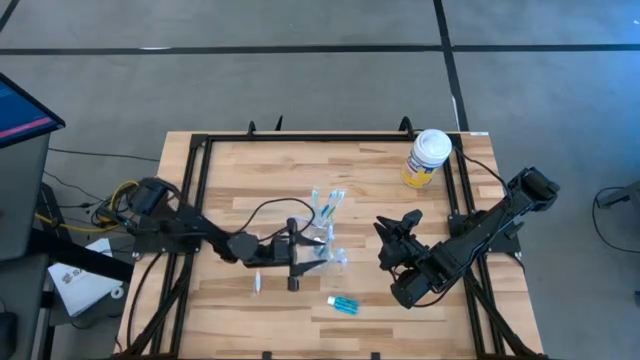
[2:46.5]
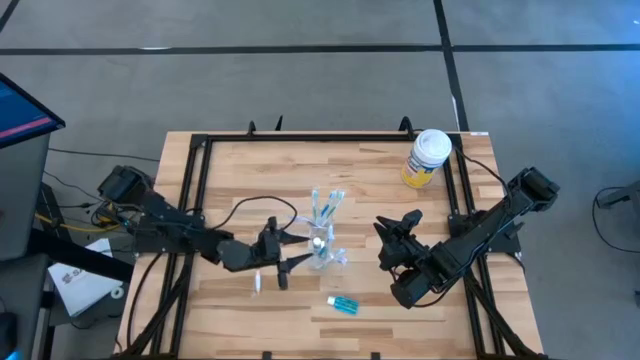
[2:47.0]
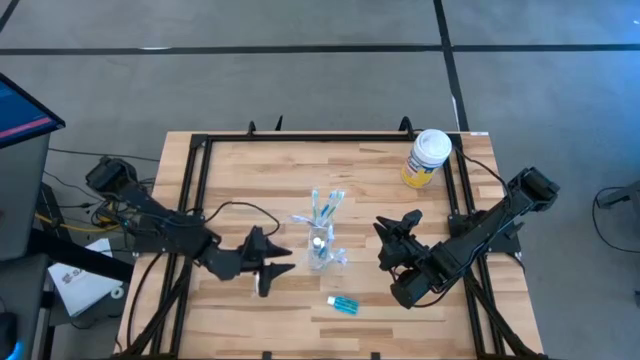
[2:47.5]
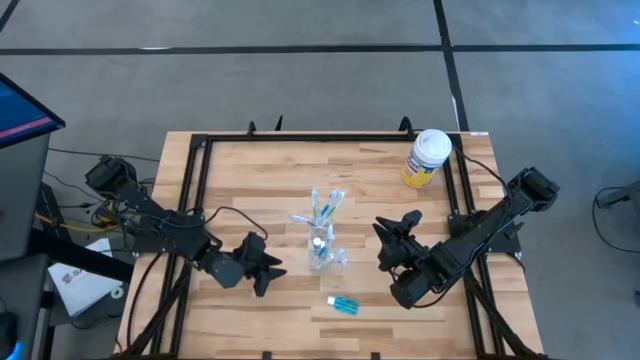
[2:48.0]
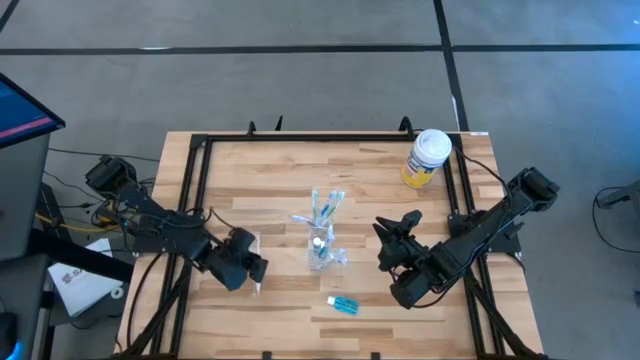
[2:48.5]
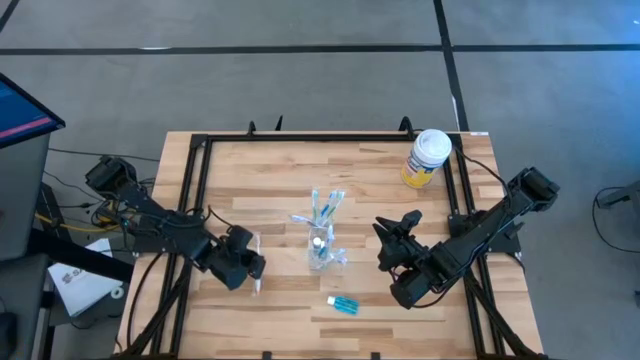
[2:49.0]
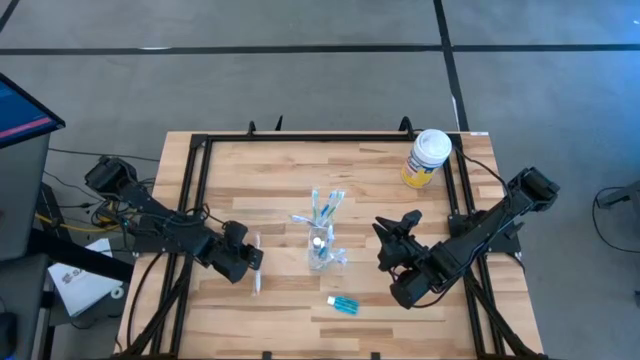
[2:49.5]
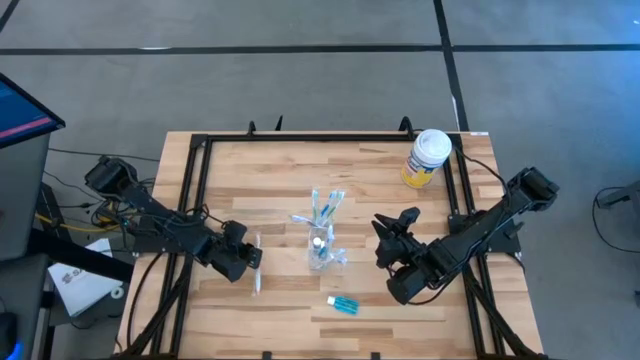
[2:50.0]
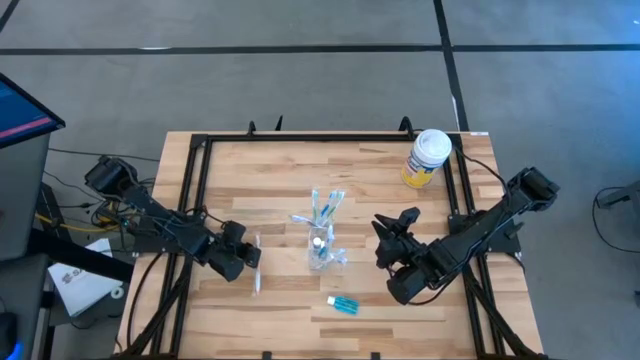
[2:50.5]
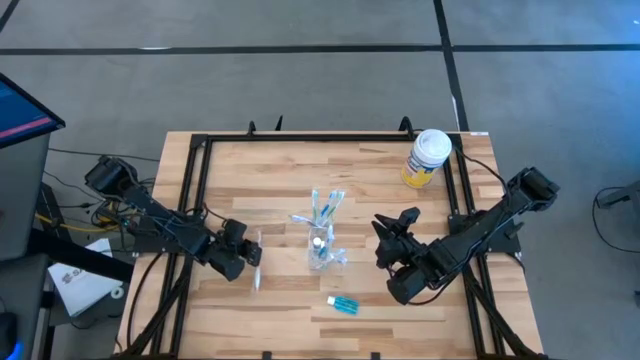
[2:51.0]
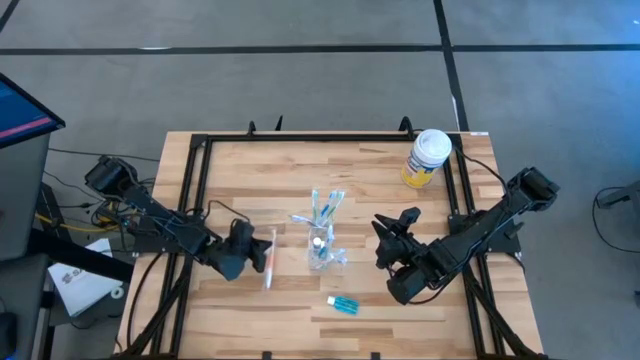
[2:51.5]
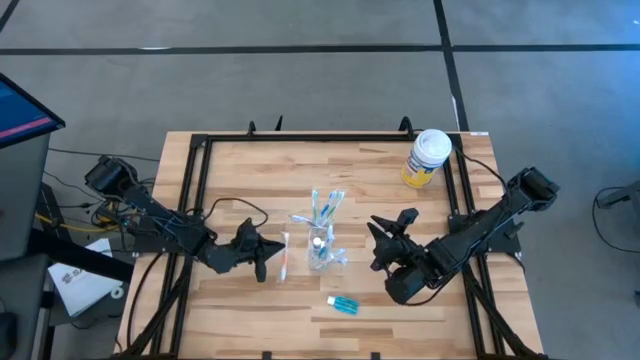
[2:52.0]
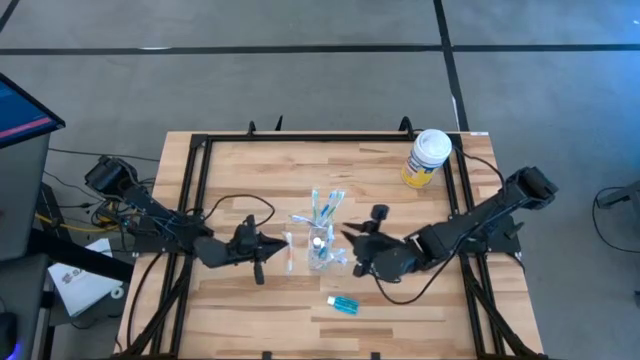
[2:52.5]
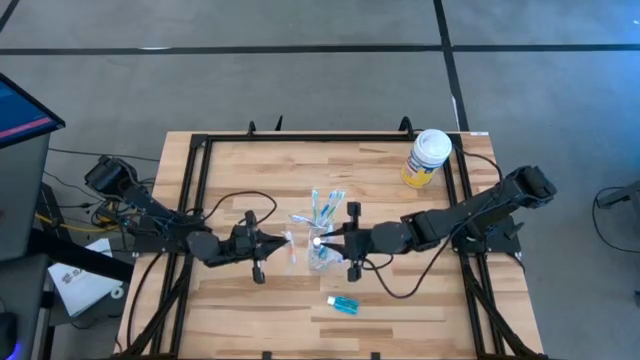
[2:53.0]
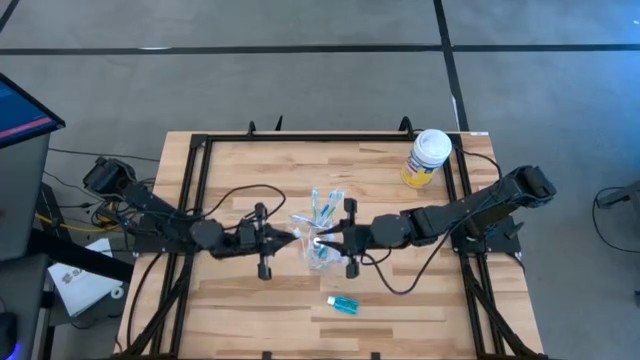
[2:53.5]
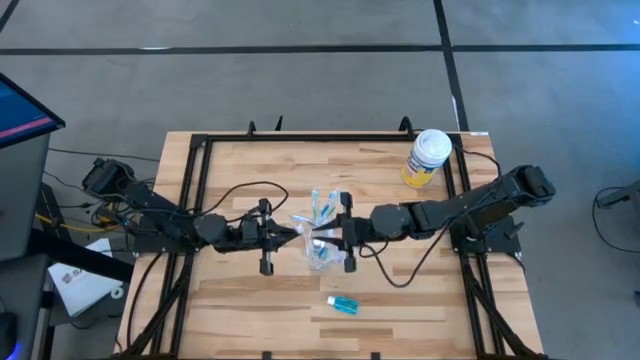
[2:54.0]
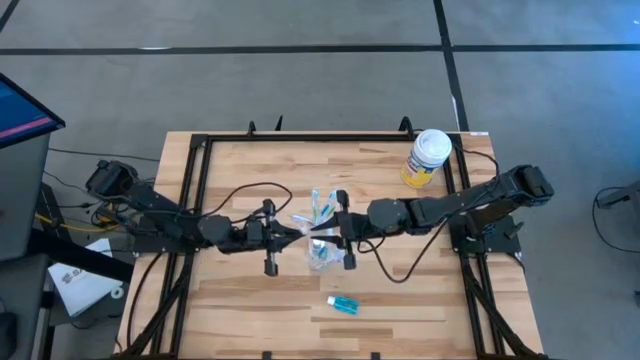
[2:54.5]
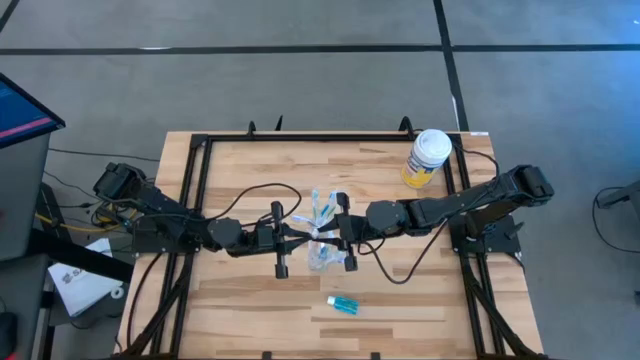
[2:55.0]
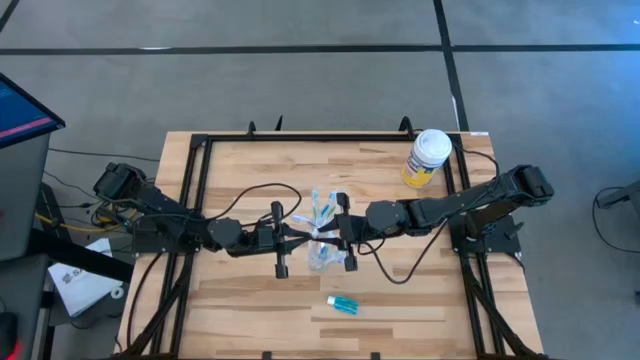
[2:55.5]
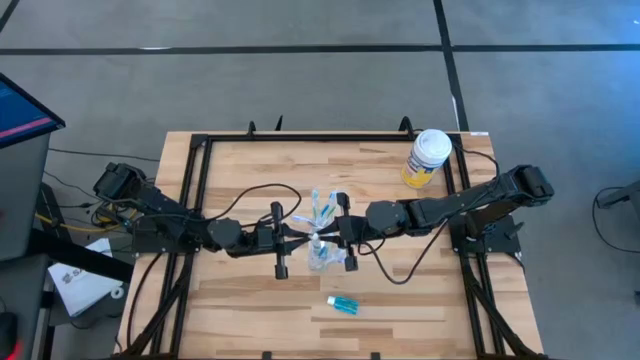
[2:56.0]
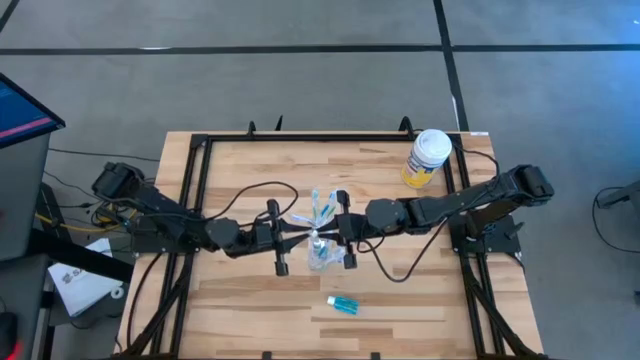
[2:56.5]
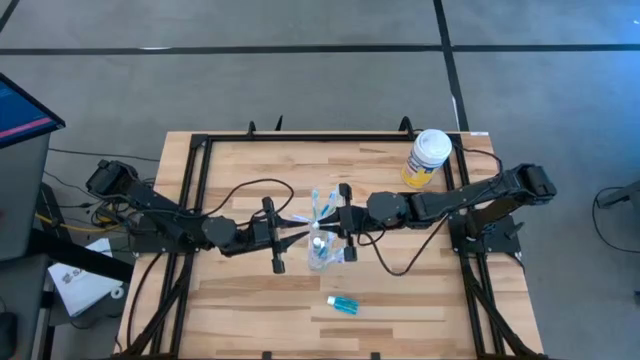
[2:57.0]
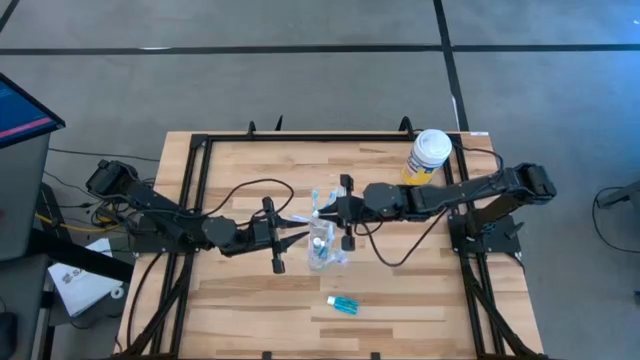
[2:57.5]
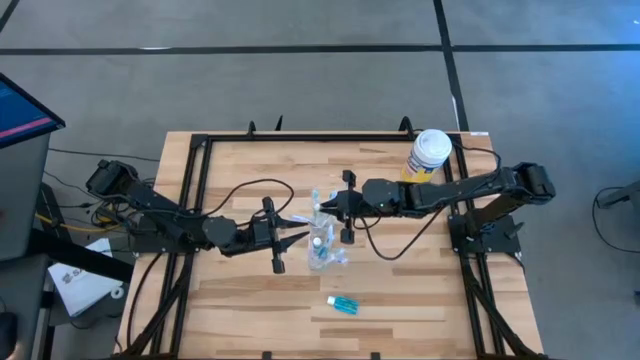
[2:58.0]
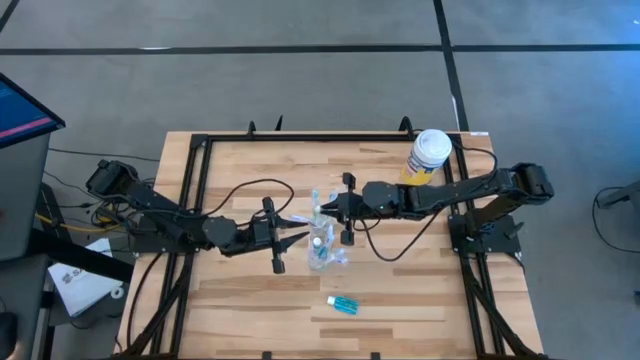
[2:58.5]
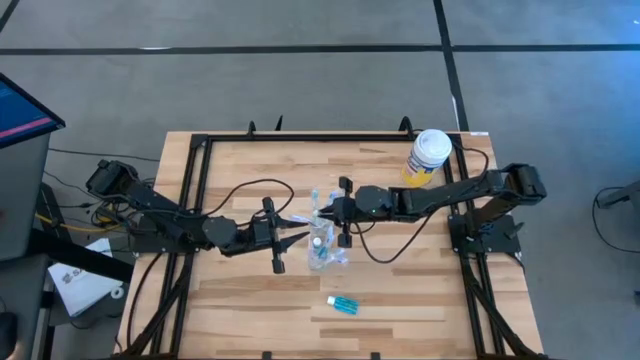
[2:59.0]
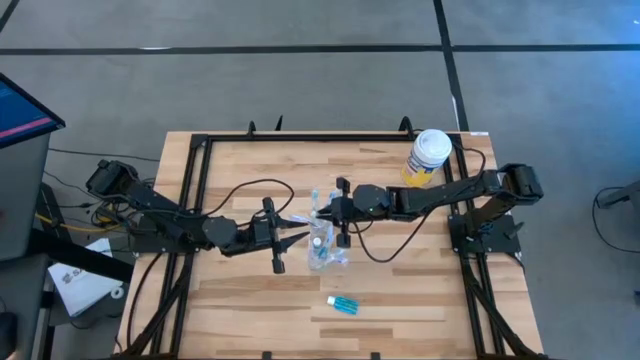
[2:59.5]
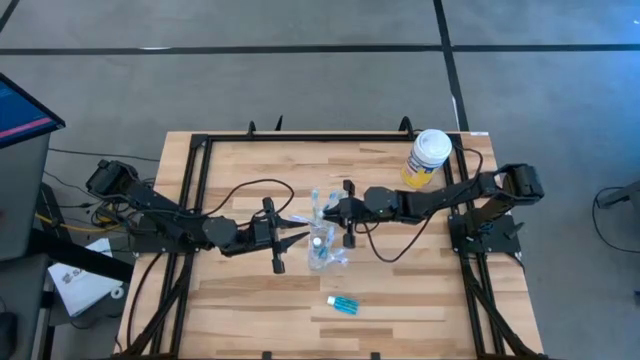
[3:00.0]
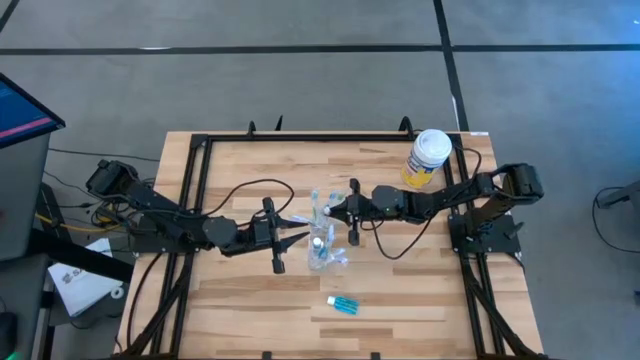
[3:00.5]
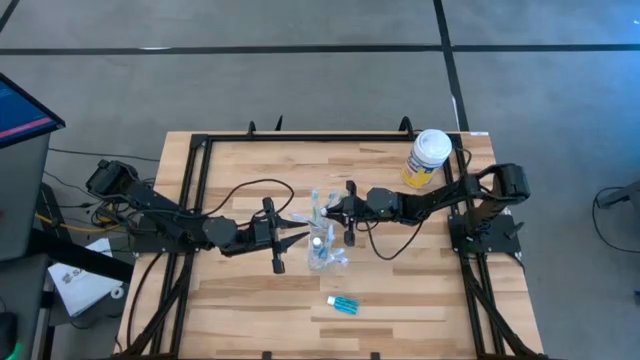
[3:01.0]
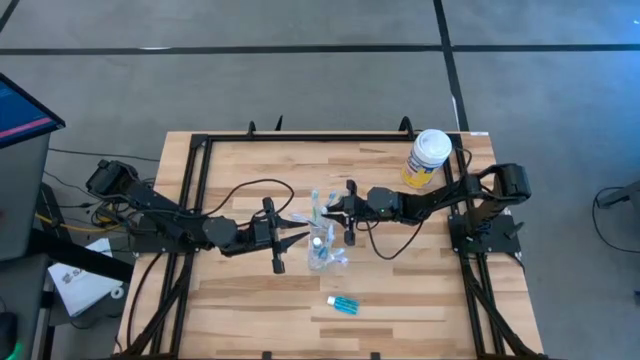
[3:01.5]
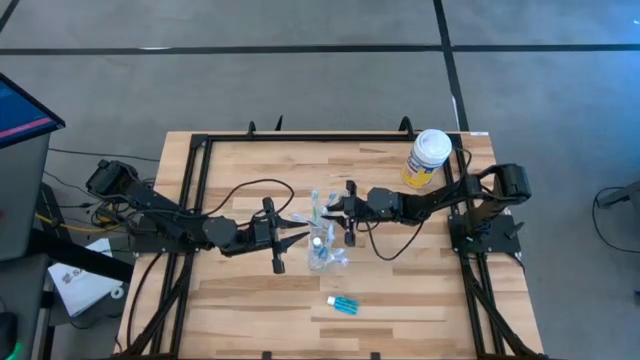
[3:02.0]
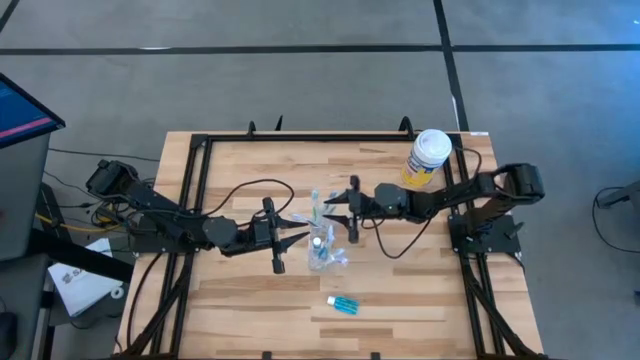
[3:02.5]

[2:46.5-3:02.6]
Task: Pick & Place toothbrushing station
Put the orange toothbrush into the transparent organizer

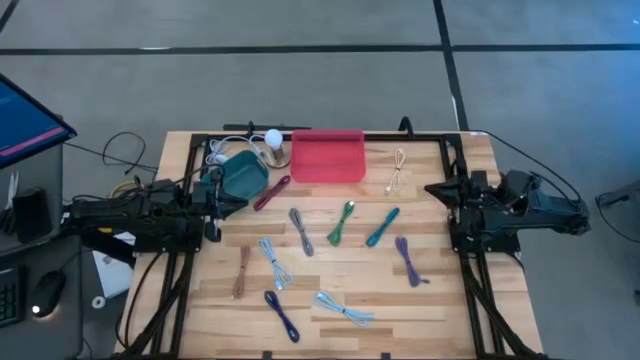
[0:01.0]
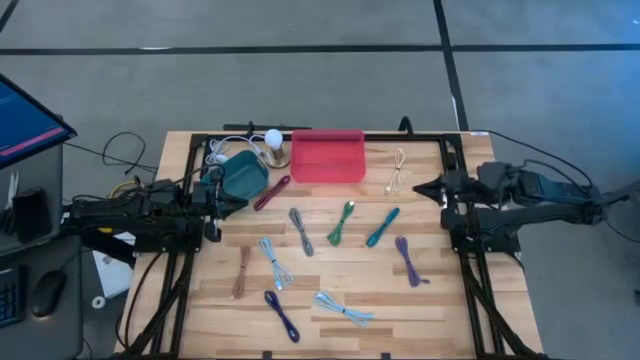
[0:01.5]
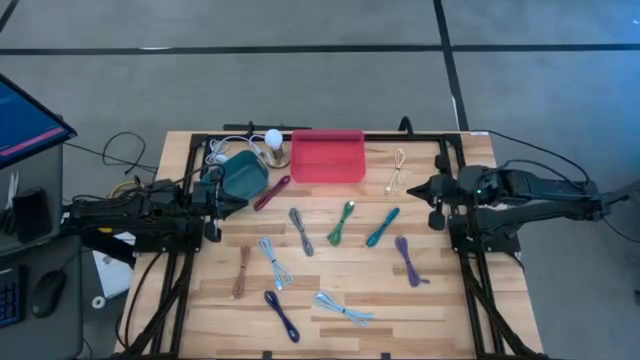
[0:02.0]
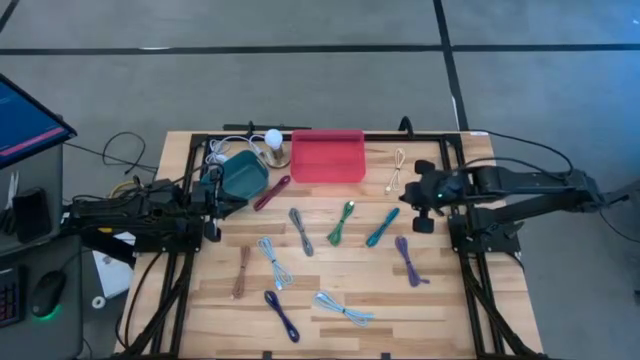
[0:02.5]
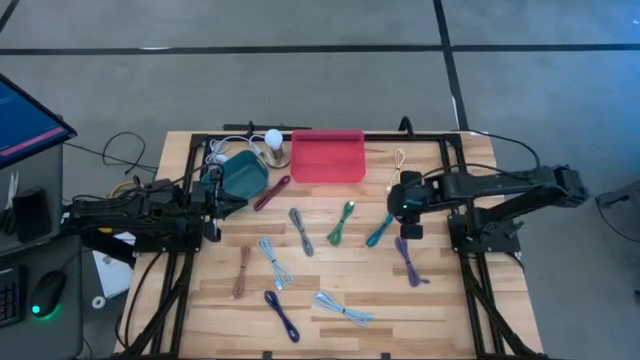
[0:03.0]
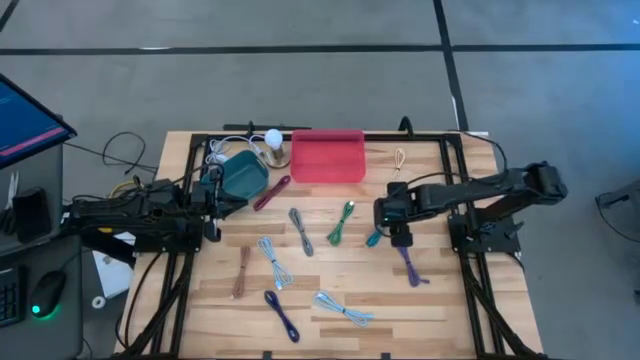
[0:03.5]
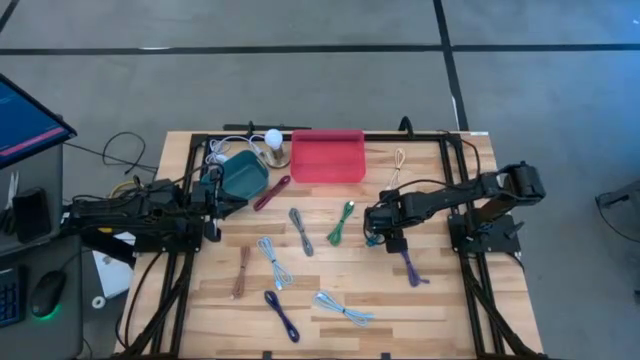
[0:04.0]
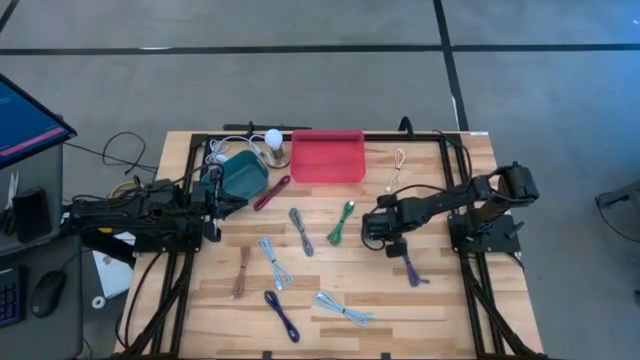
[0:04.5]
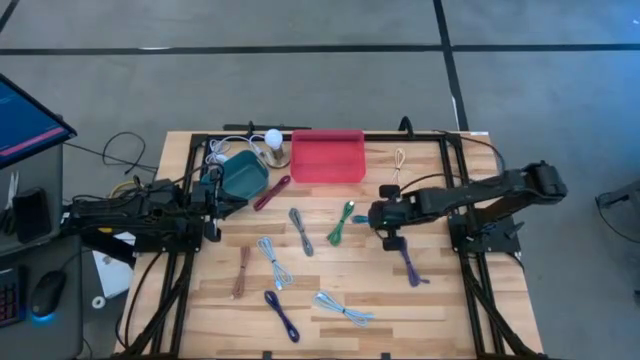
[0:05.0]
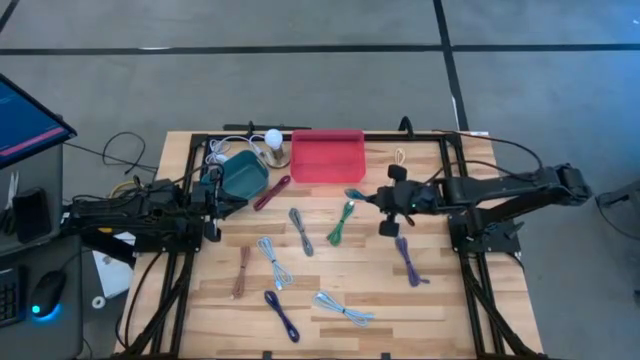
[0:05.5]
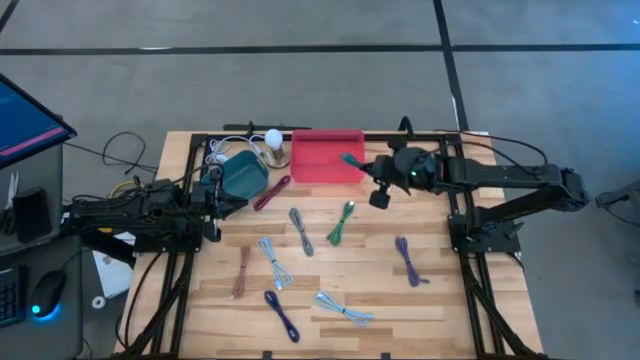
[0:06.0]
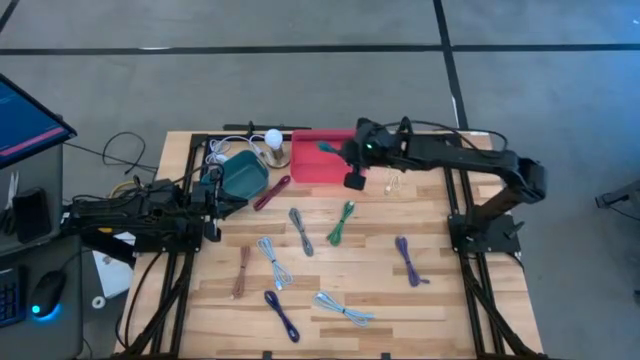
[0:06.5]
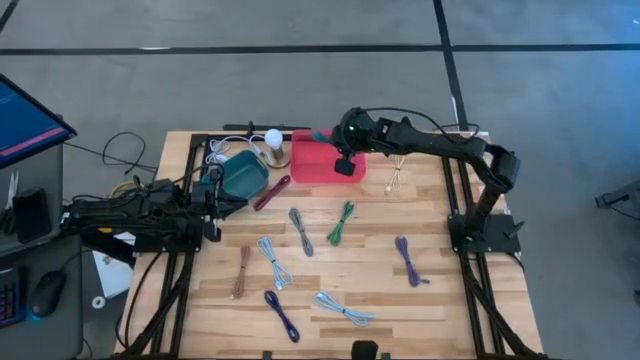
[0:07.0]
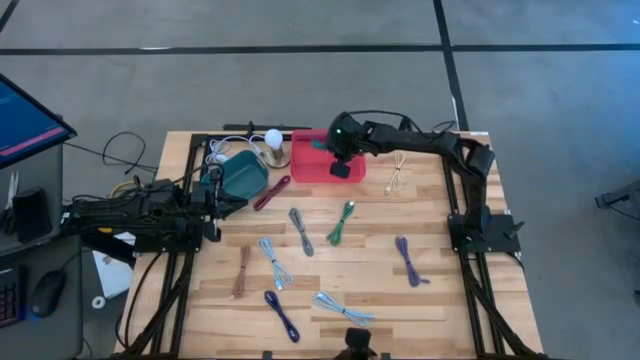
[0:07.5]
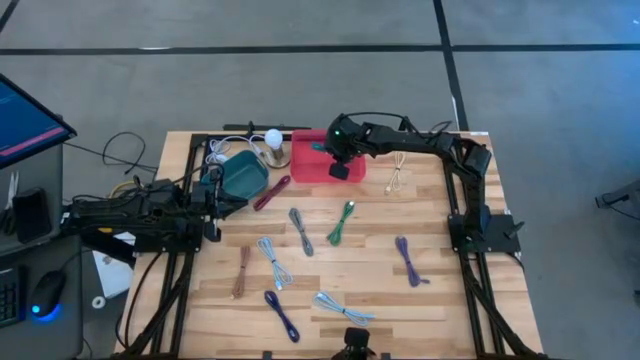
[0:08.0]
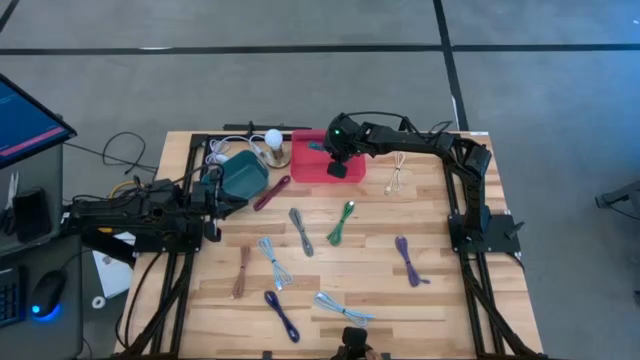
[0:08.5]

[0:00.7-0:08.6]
Task: Pick & Place USB Port
Put the black and blue USB cable into the pink bin
